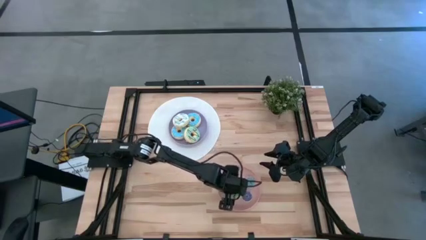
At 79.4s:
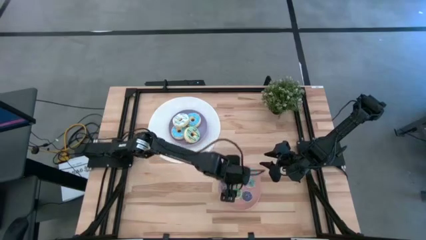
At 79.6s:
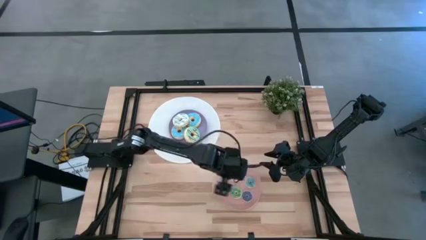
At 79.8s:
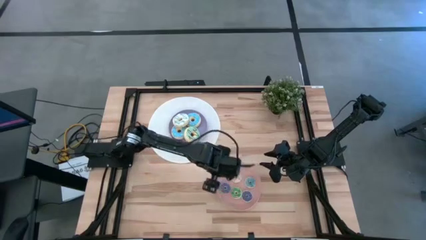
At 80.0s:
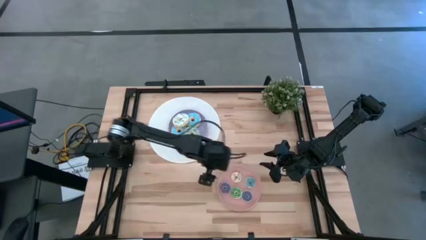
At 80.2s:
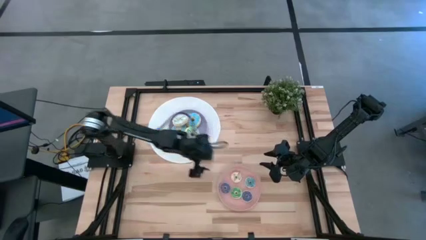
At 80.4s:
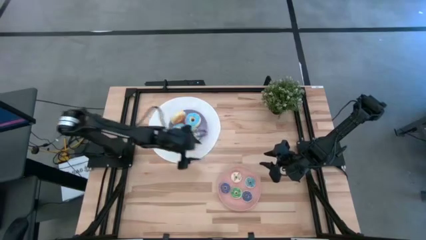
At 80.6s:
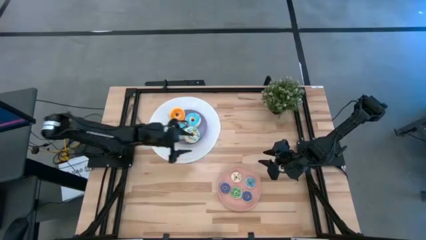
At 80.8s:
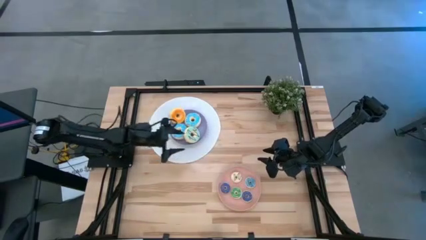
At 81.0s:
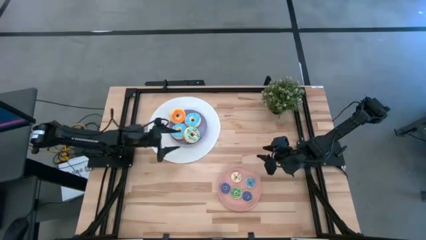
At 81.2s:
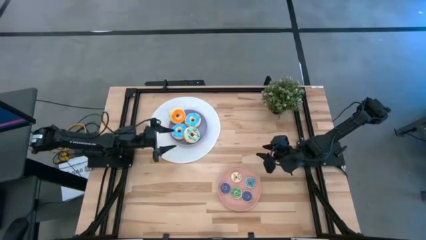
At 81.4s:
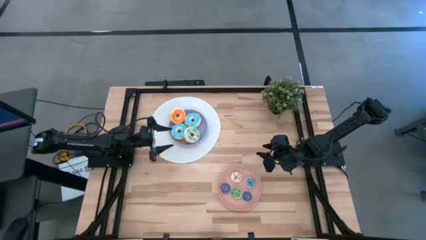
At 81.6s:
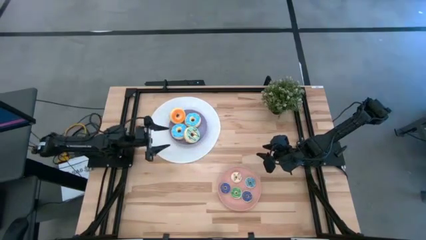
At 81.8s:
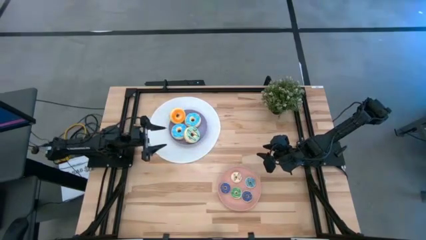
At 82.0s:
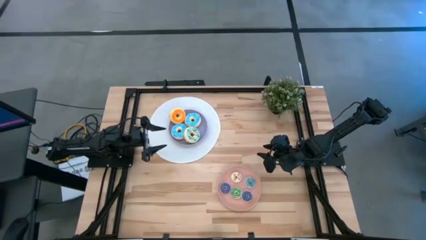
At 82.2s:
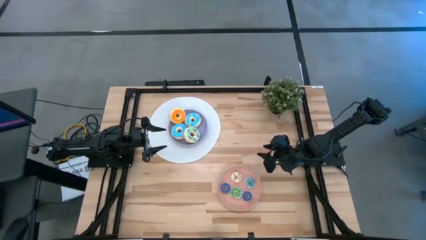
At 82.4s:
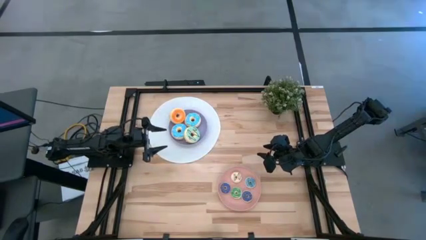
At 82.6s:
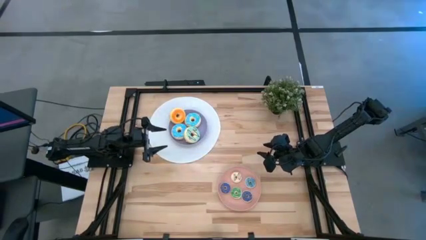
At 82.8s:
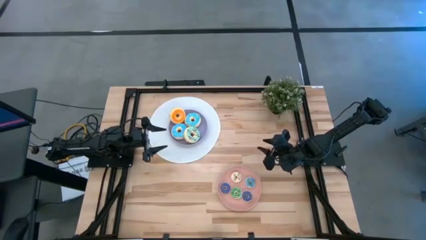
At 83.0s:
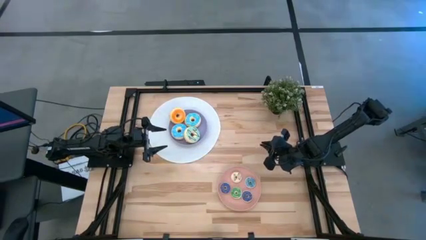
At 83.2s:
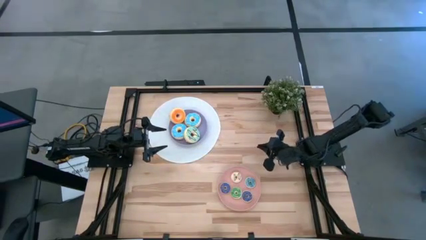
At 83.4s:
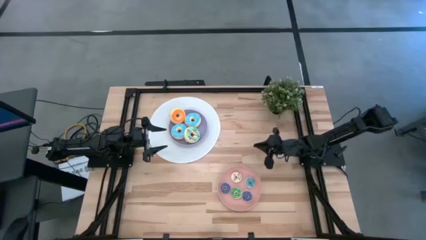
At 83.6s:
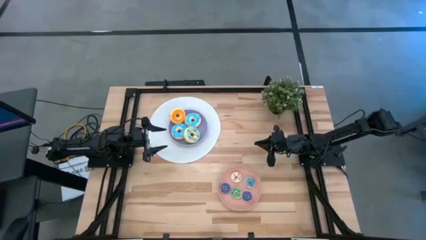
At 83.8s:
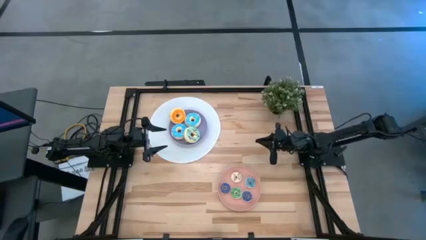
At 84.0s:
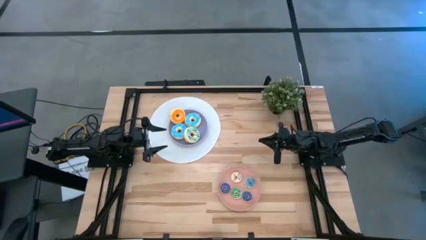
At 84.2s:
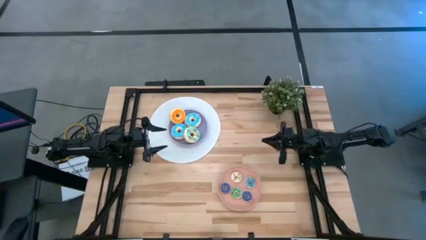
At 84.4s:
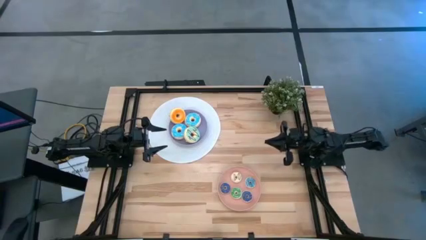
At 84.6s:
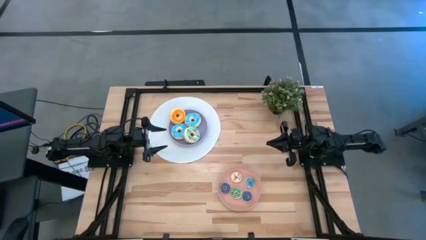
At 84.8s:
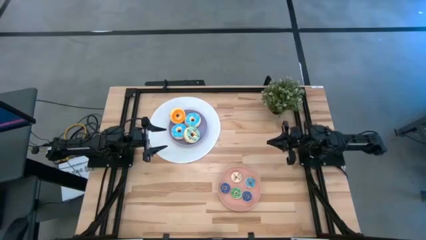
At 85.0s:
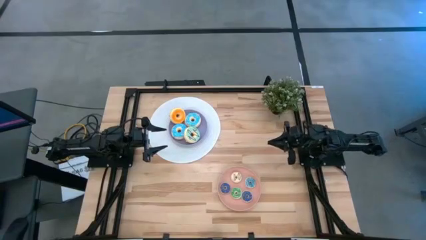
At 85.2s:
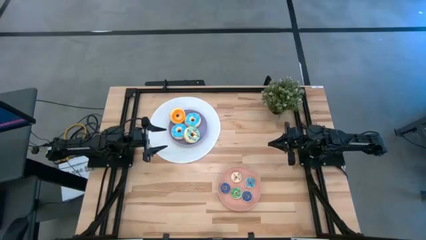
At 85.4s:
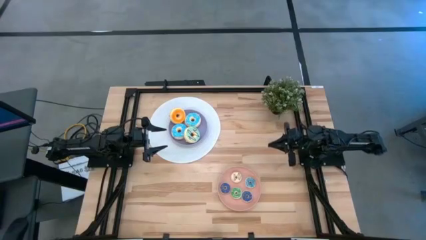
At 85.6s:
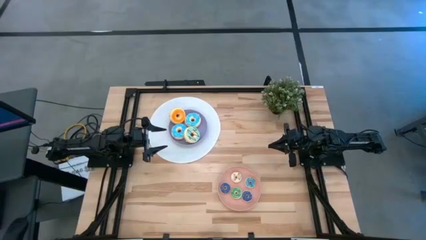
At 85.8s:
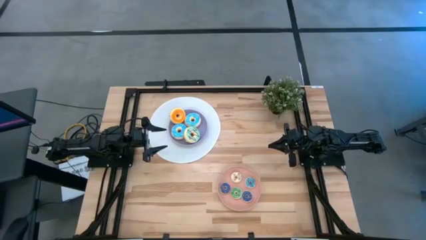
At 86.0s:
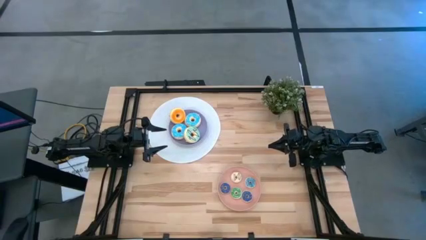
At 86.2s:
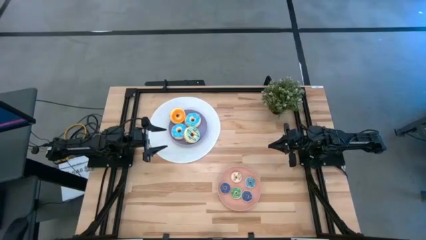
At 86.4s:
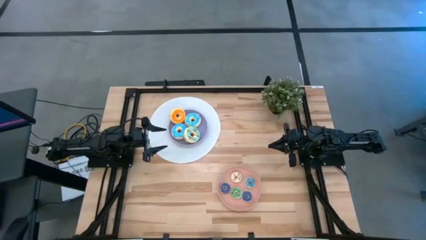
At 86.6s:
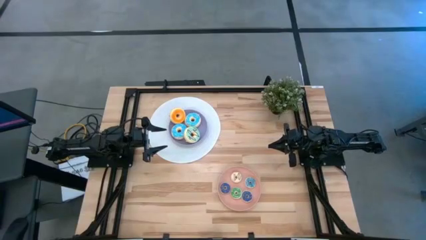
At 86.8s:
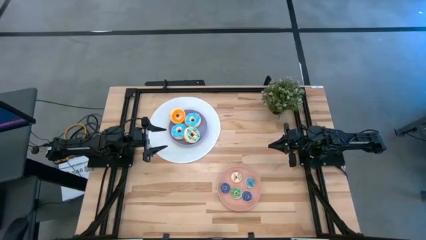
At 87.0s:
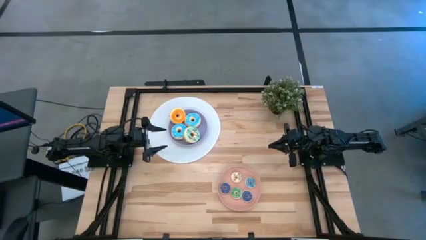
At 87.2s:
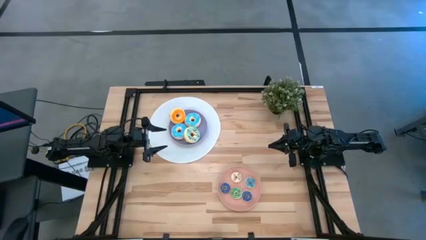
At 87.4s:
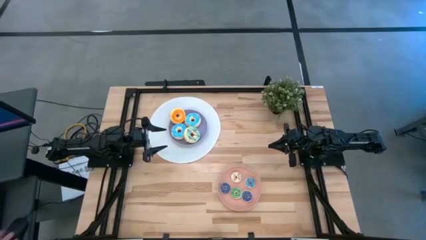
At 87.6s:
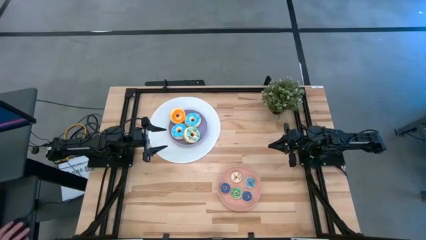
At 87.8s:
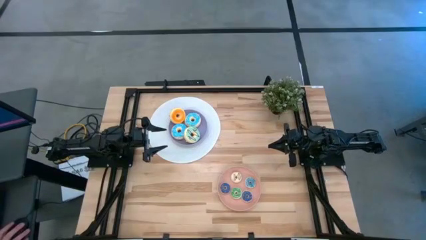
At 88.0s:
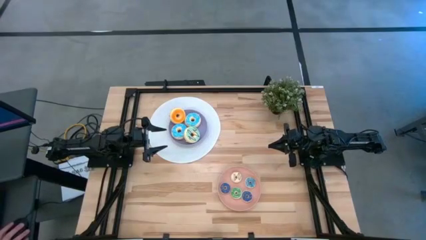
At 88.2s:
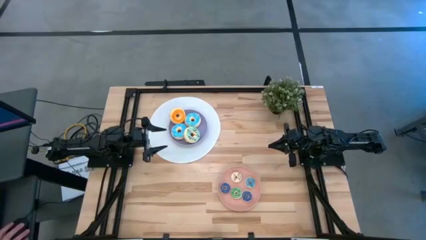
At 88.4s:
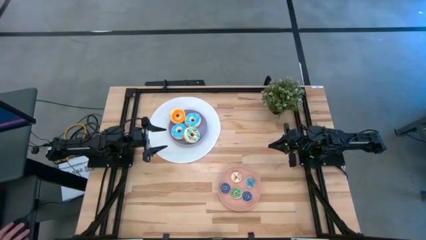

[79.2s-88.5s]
Task: Pick & Place donuts
Return to Home Position

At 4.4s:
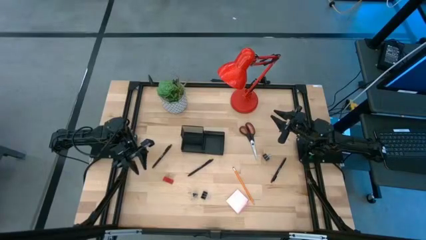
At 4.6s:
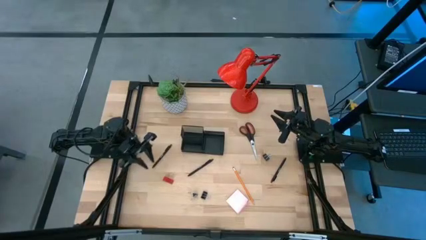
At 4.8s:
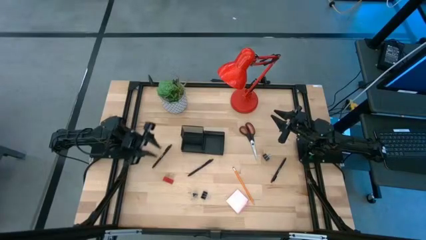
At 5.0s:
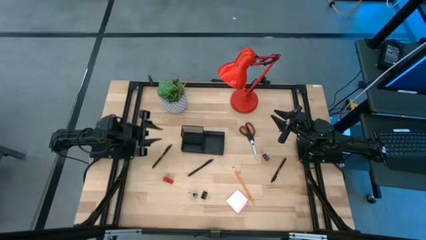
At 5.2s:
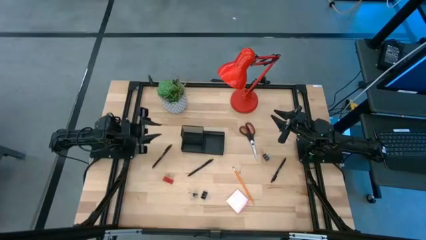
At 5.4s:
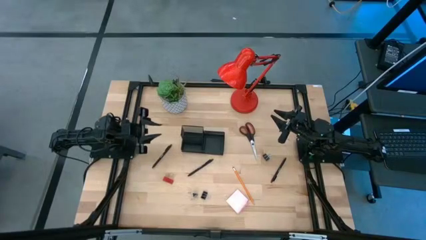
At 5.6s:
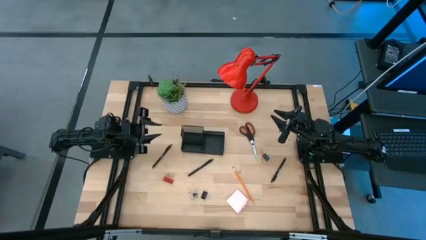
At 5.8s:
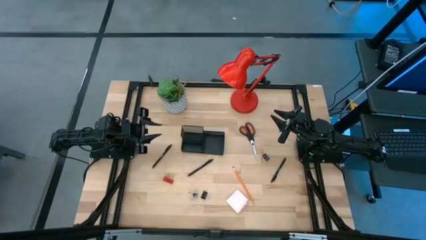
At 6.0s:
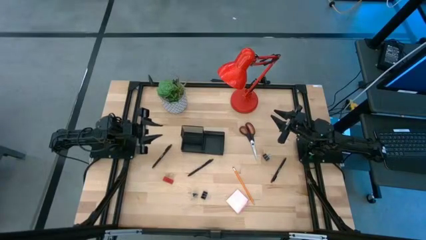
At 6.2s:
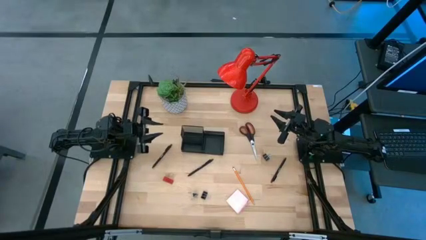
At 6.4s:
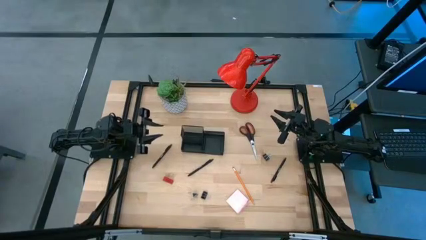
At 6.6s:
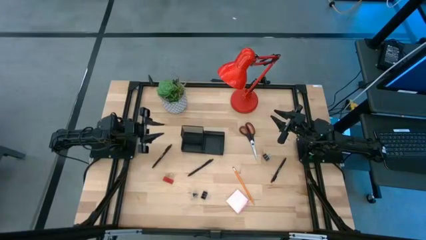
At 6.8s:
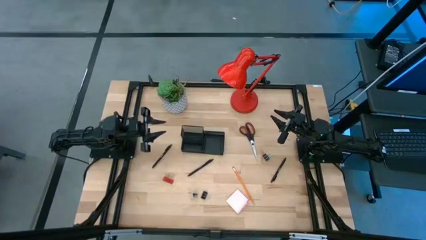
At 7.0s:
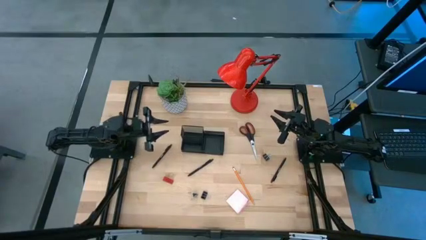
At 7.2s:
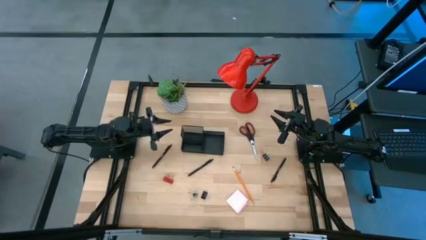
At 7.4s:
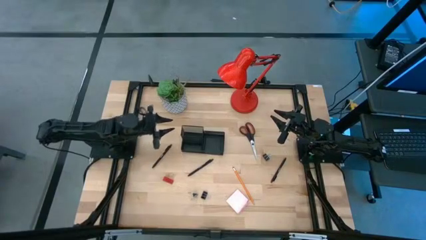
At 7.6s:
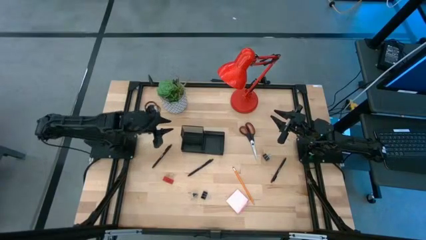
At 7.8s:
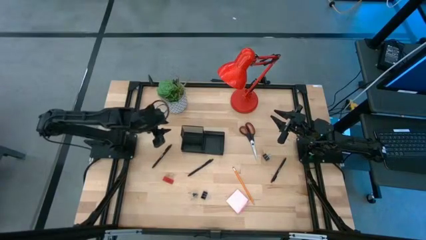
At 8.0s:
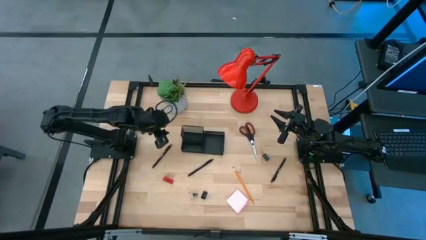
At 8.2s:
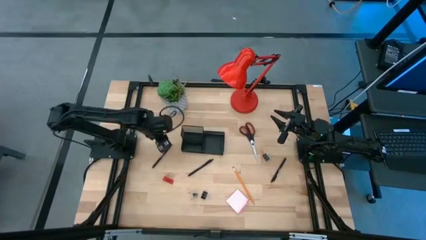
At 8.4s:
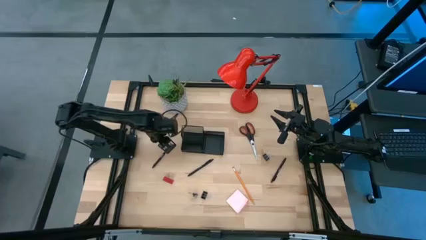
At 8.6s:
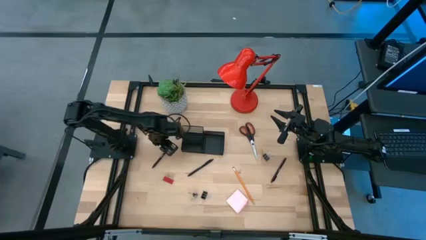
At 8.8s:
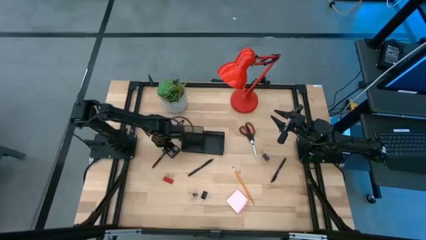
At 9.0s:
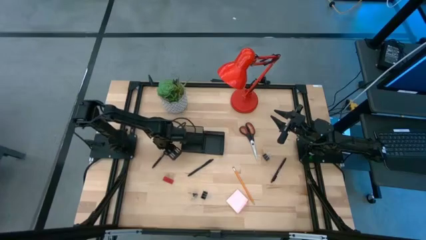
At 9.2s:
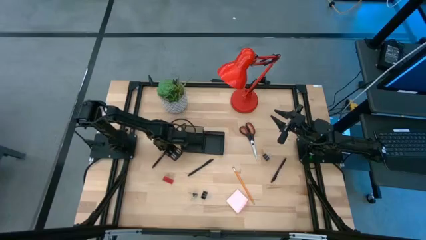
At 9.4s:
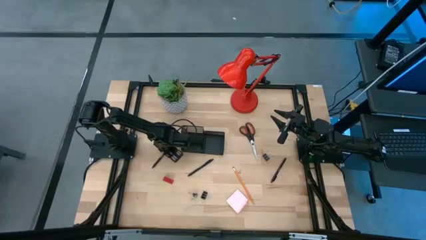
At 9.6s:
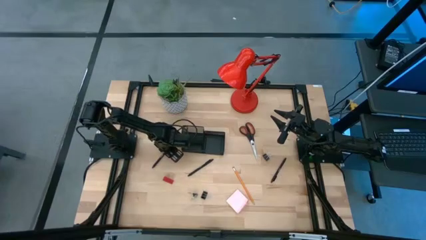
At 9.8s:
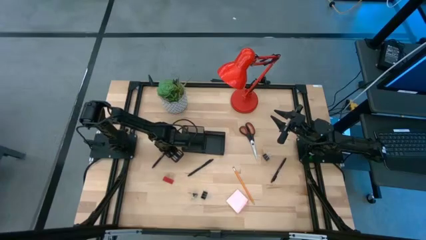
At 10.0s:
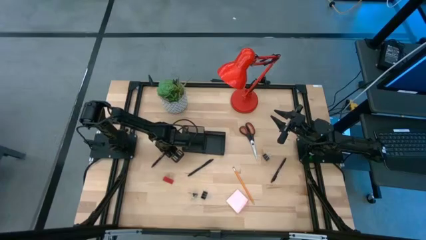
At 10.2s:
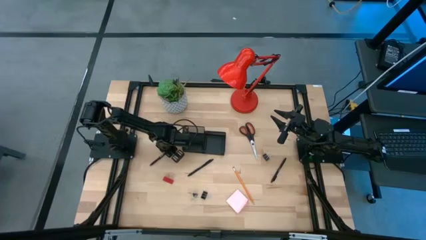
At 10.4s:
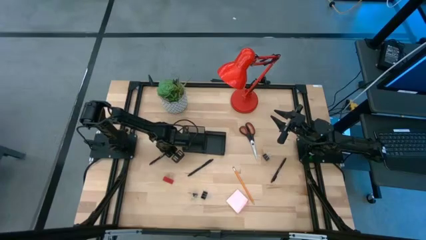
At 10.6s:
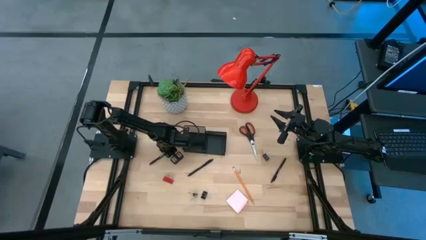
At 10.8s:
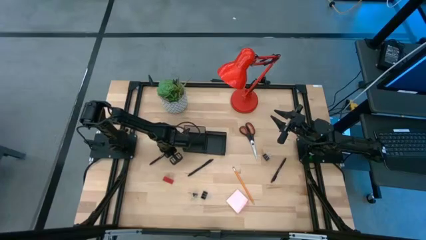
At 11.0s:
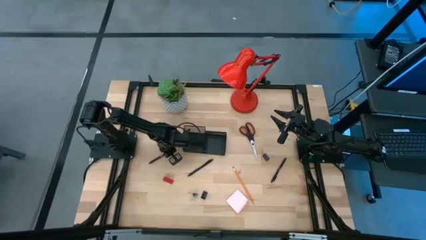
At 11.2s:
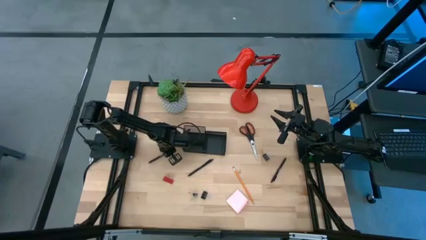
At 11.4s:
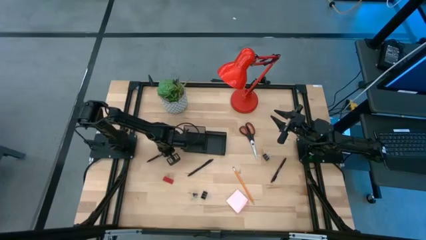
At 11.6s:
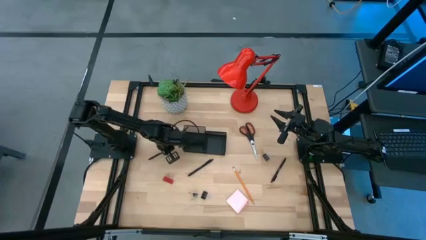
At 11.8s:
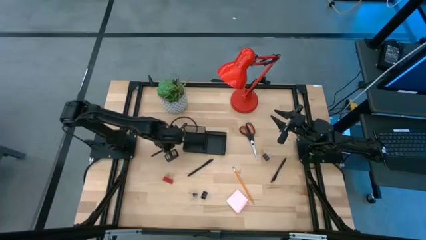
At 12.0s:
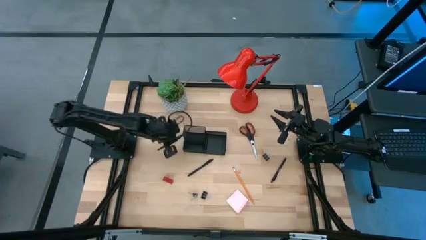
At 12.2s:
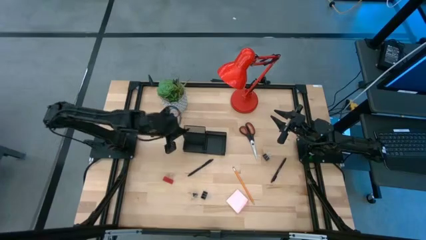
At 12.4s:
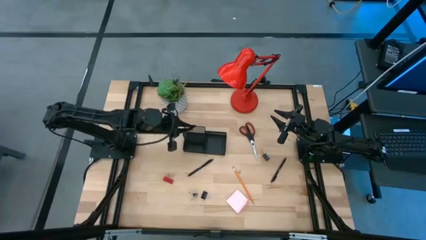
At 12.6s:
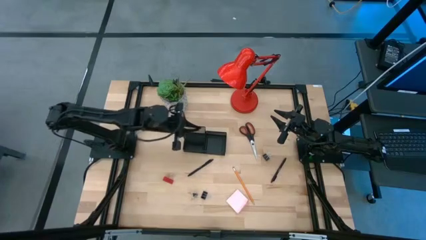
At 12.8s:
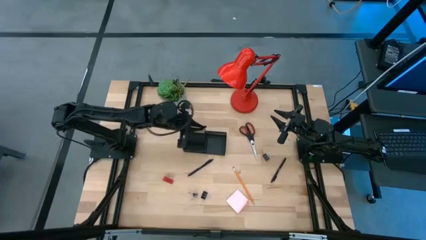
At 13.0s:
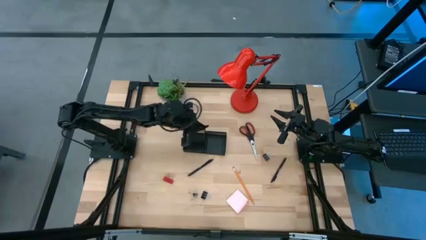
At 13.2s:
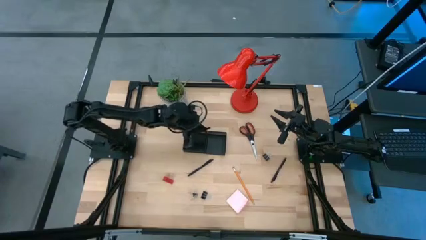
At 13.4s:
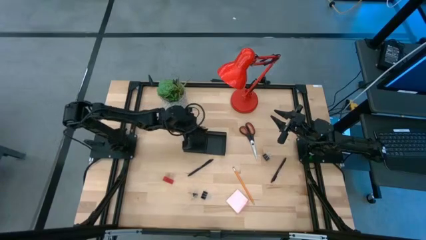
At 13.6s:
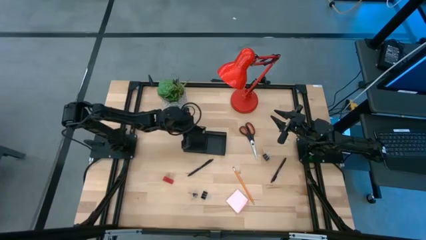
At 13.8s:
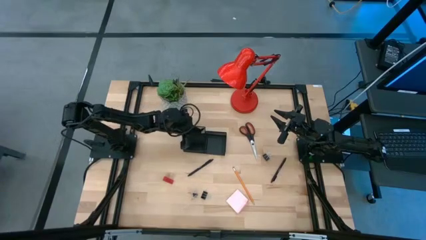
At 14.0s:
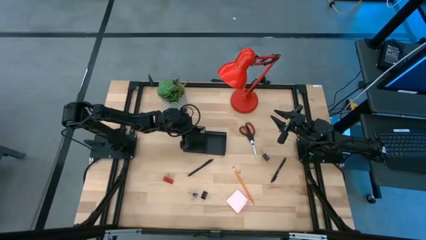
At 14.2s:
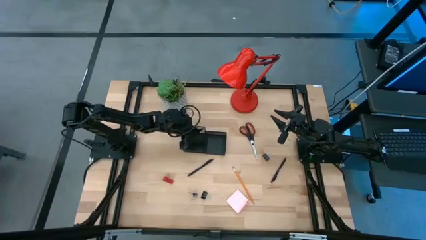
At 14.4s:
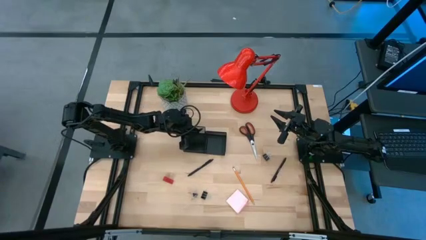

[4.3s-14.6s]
Task: Pick and place office supplies into organizer
Put the left black pen into the black desk organizer
